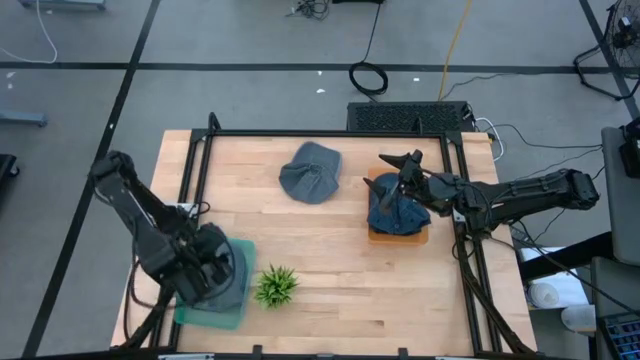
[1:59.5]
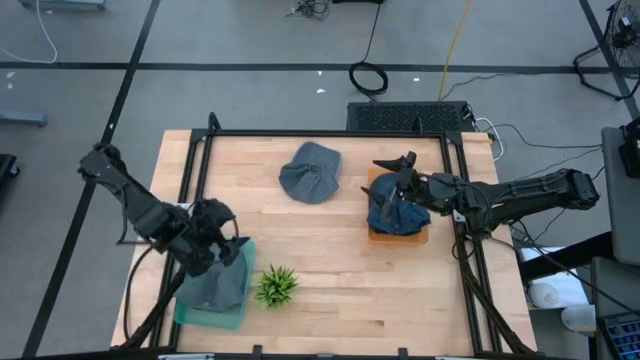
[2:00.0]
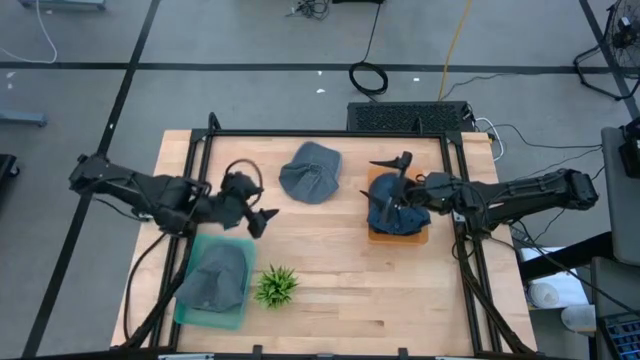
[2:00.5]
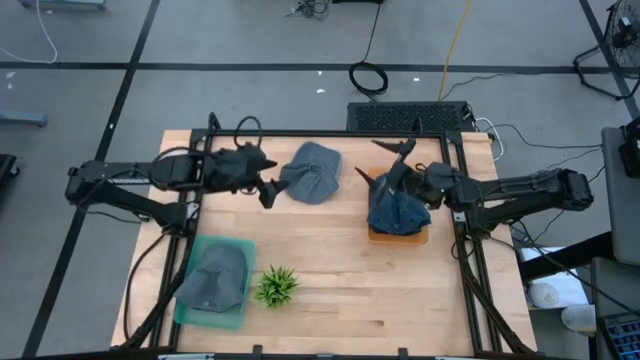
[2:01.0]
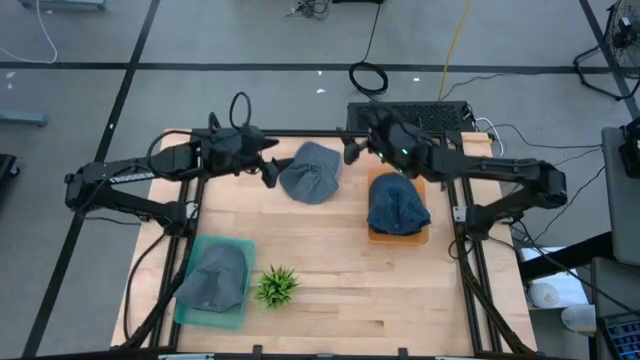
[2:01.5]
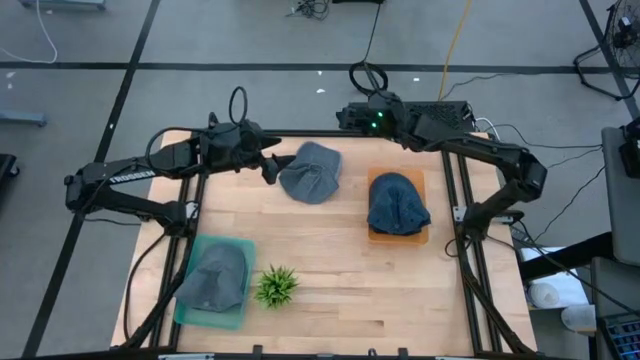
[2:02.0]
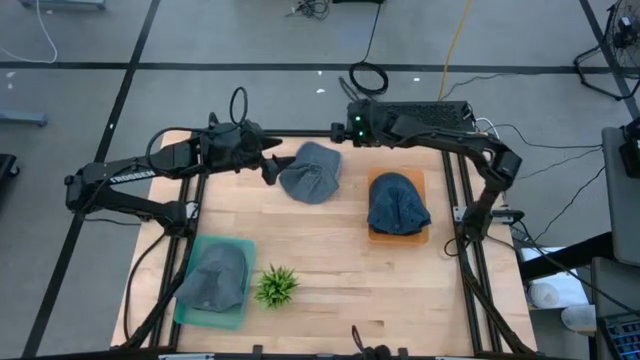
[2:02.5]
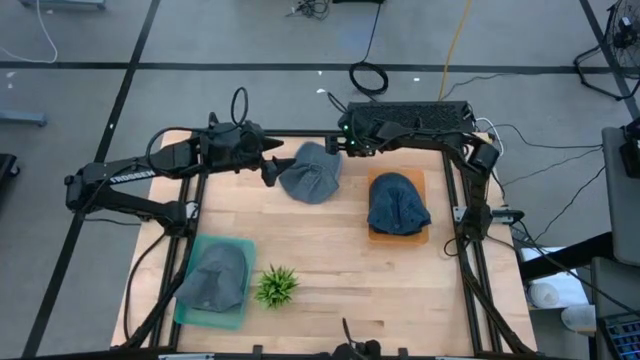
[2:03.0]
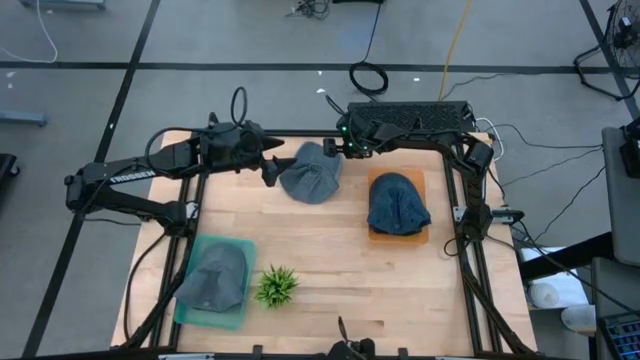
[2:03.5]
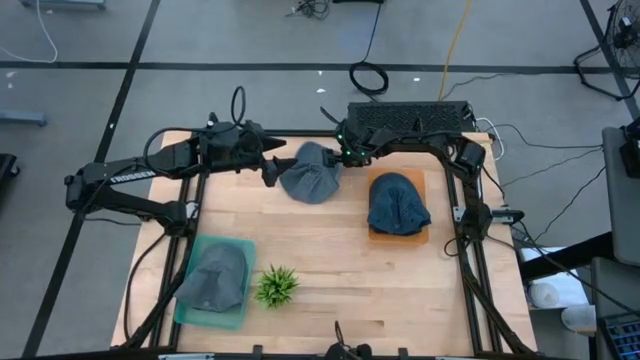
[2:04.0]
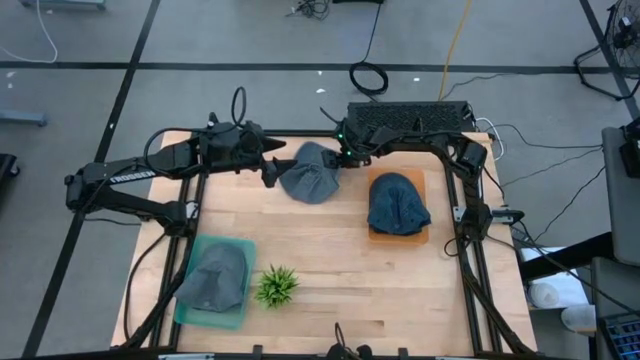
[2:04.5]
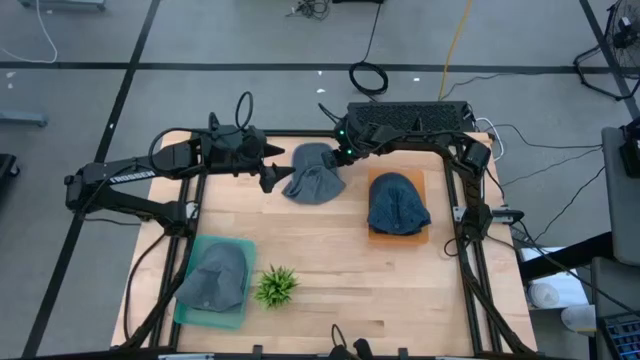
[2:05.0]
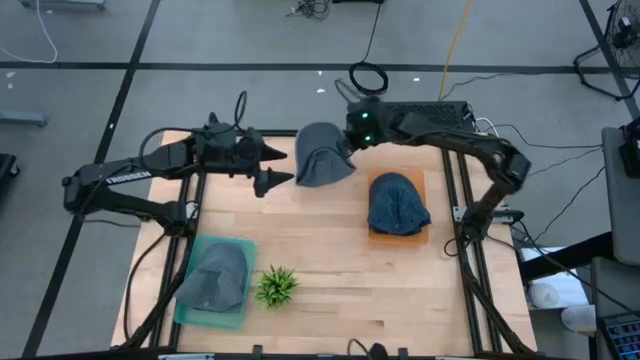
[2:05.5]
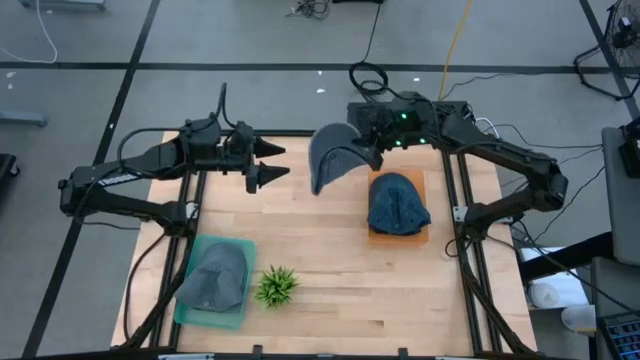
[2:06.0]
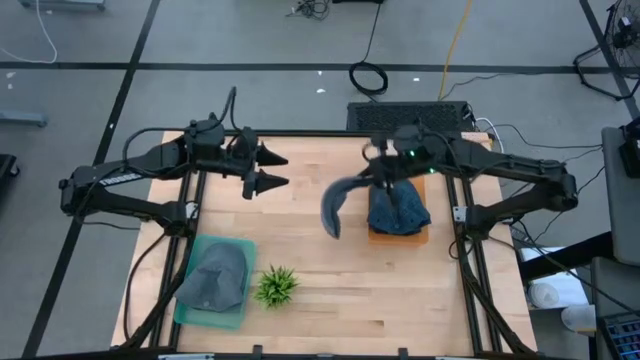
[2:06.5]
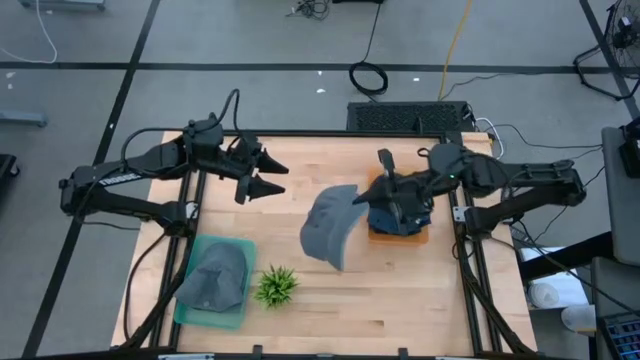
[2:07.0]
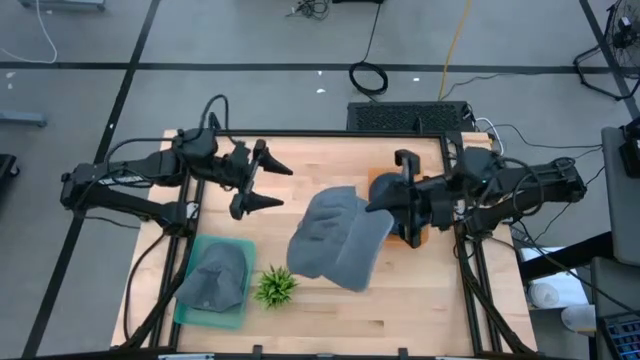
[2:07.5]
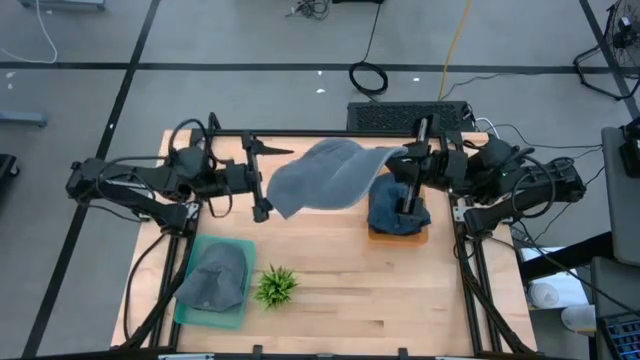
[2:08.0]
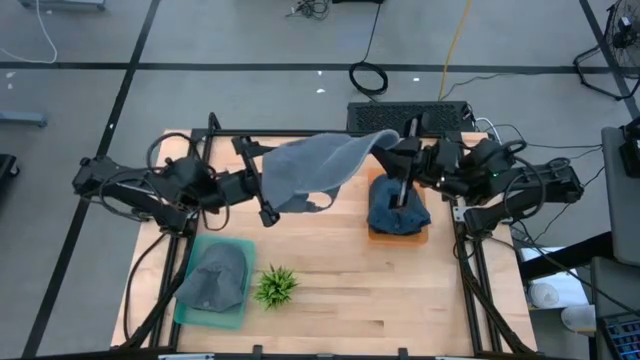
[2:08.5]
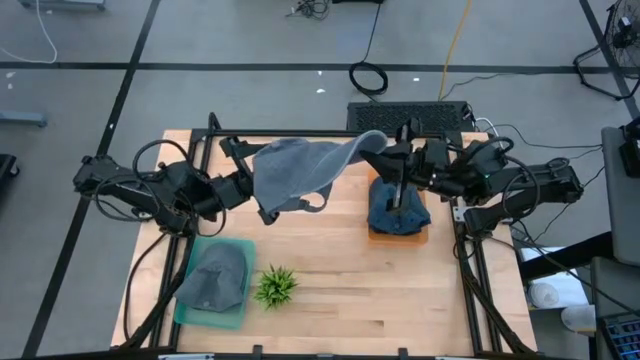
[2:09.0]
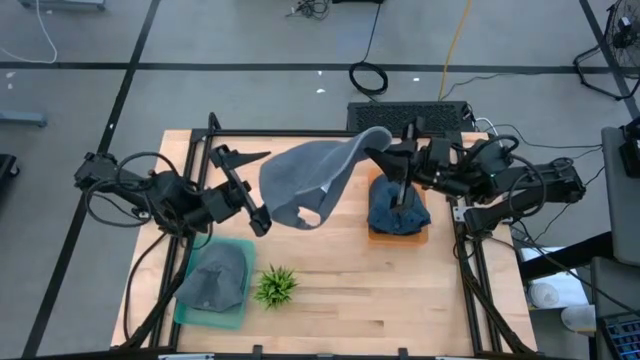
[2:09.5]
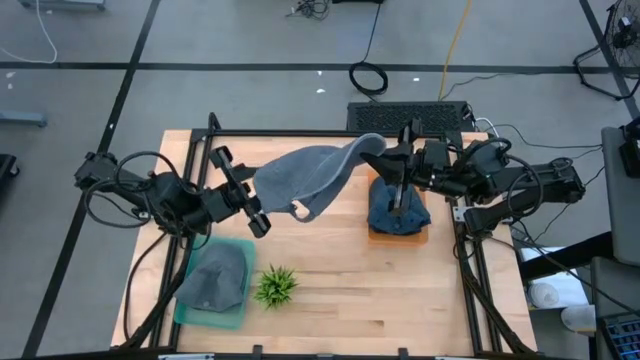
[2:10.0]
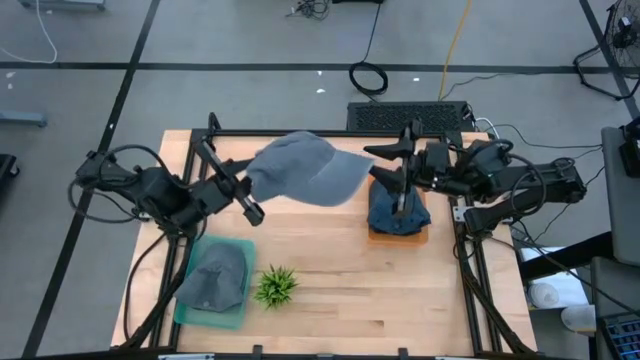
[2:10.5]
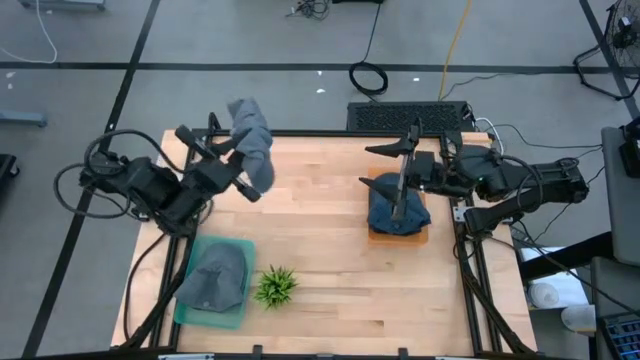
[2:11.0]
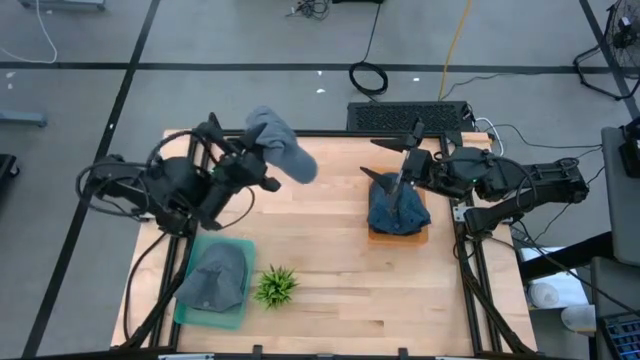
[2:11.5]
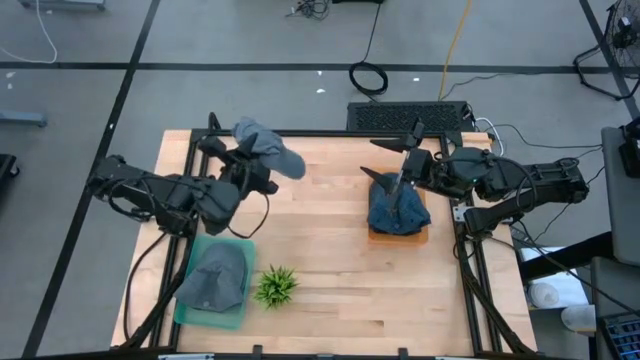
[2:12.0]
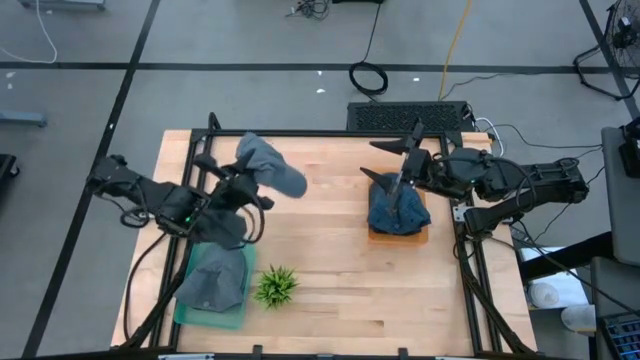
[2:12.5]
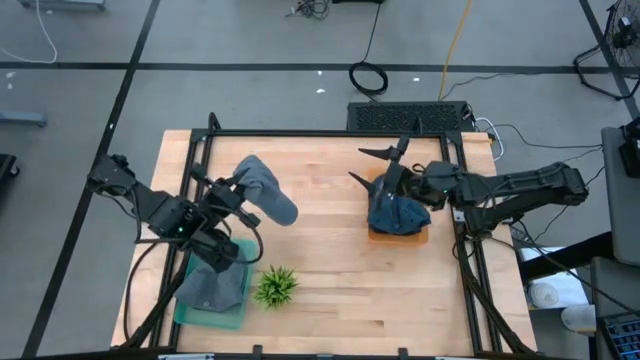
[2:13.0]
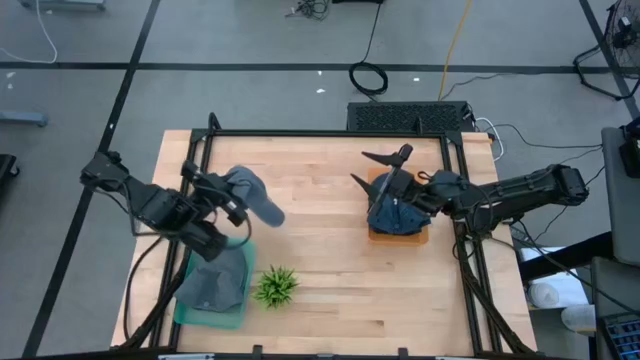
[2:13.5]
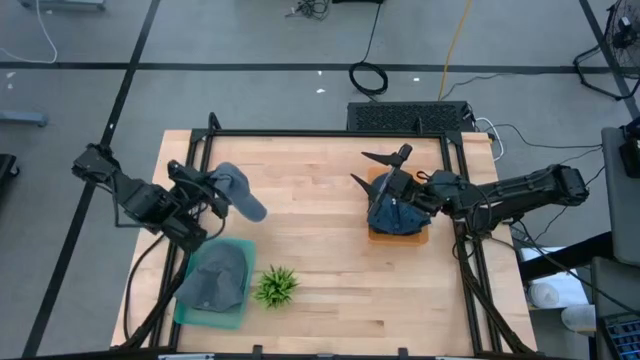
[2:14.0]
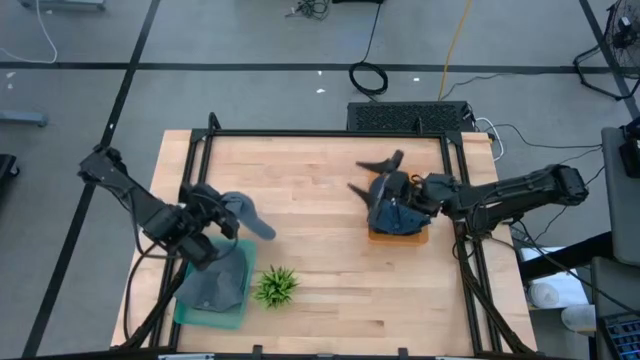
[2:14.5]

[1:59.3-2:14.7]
Task: Pick & Place hat
Put the gray cap into the green bin

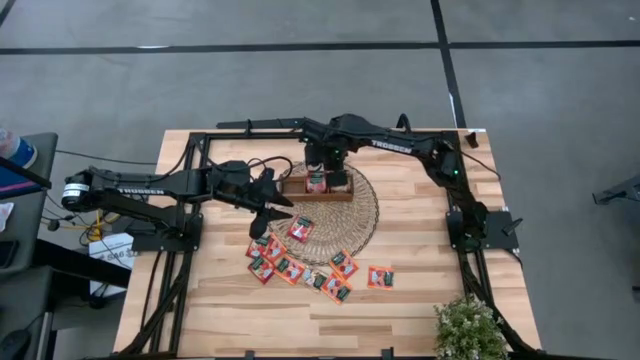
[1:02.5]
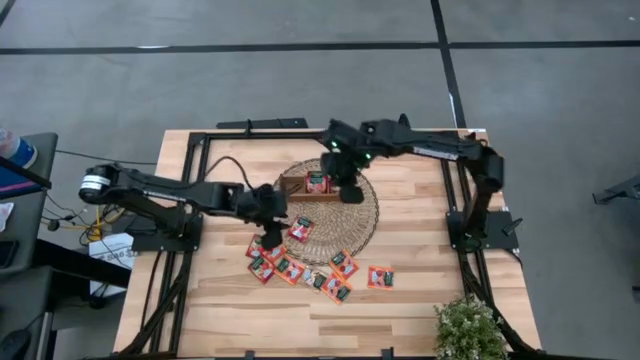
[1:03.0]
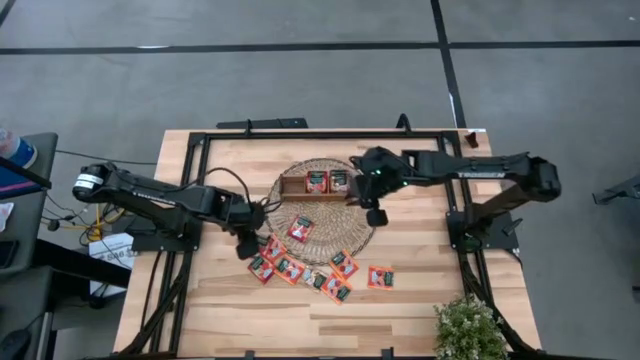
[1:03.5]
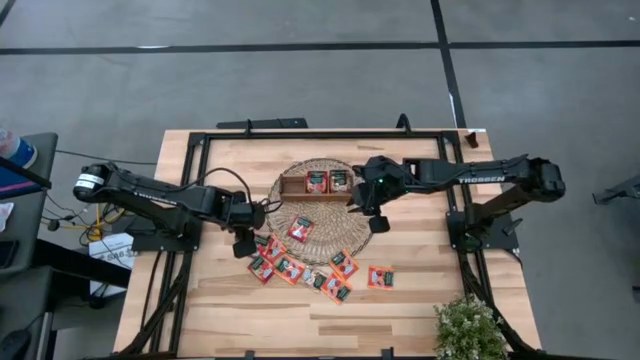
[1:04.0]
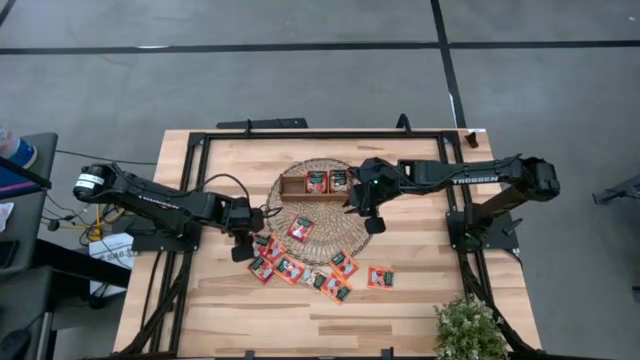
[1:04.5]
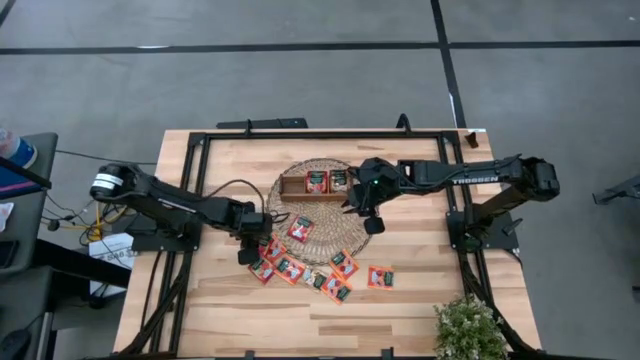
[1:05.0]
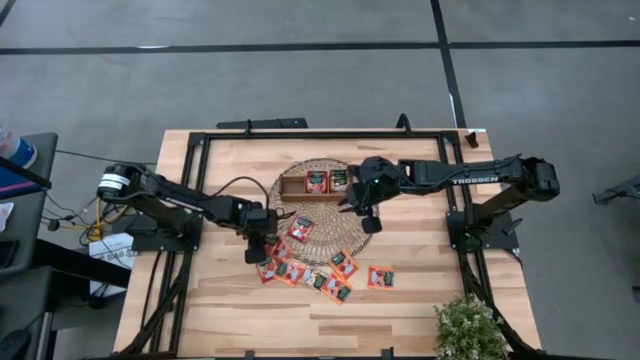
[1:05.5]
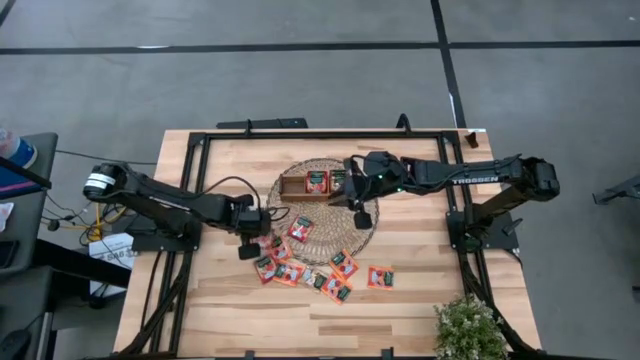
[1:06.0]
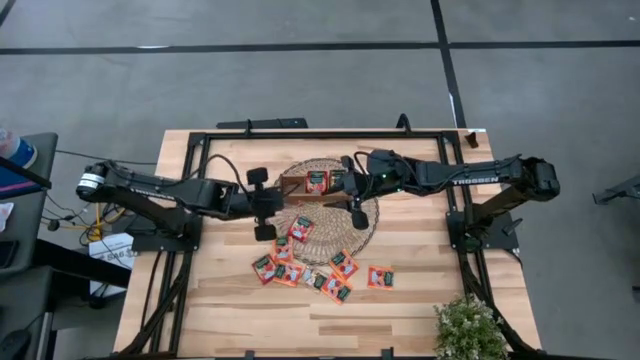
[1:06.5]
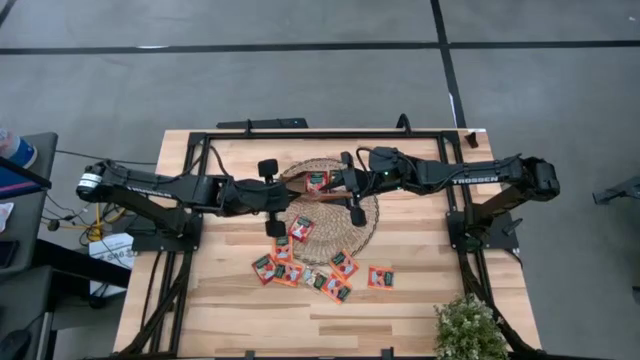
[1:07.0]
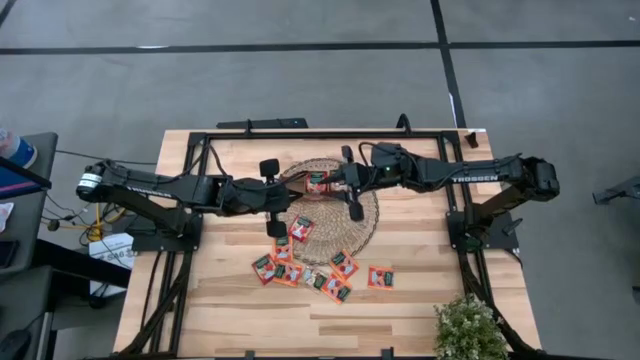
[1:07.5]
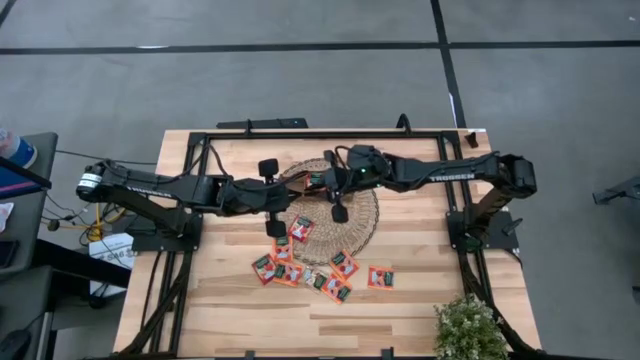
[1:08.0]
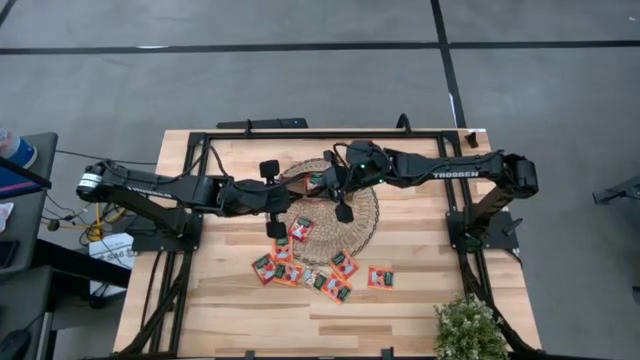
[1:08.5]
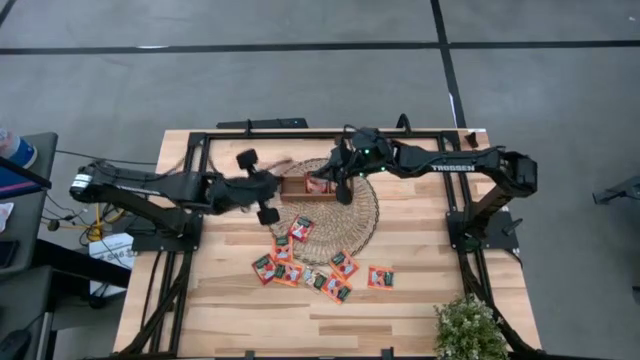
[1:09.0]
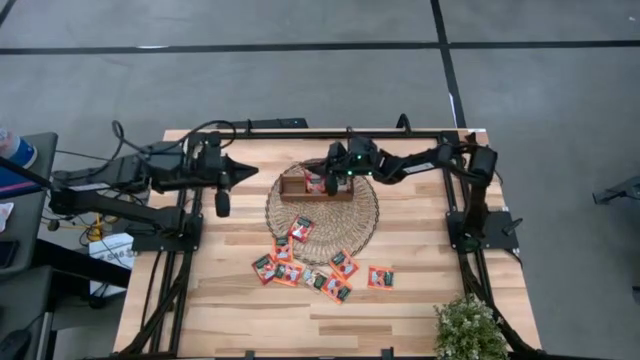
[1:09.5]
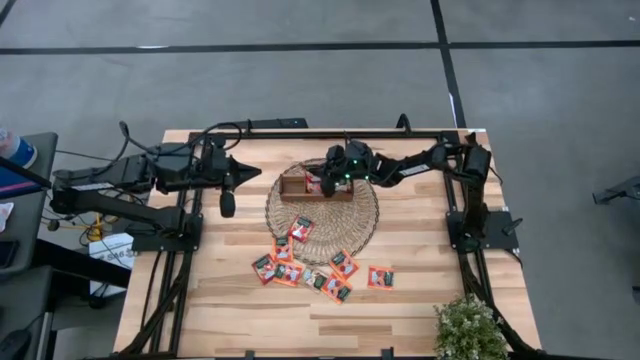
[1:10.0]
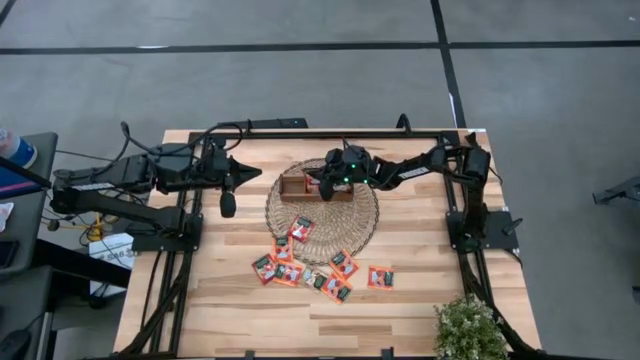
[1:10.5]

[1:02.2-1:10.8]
Task: Pick & Place Tea
Put the left top red tea bag into the middle section of the wooden organizer
